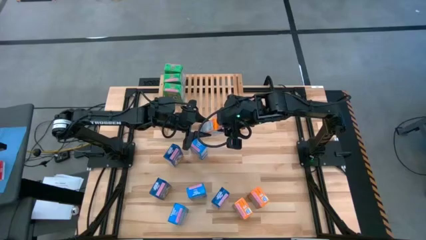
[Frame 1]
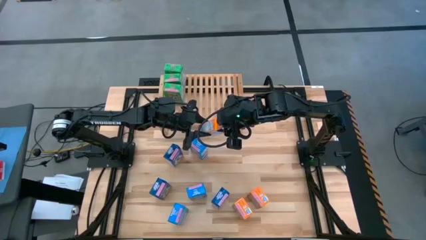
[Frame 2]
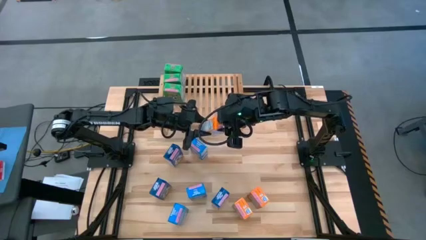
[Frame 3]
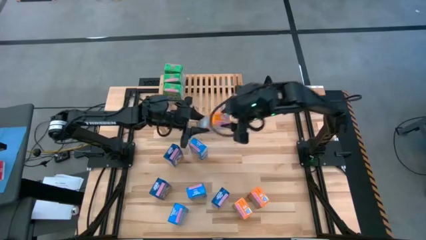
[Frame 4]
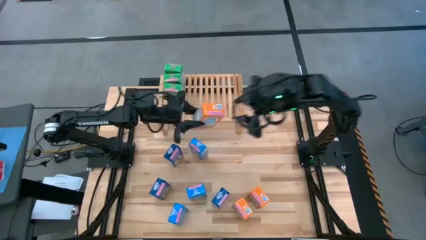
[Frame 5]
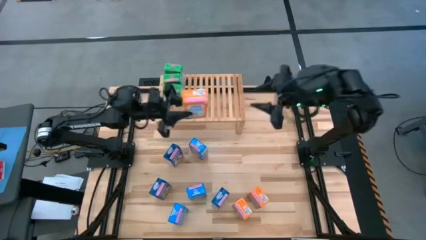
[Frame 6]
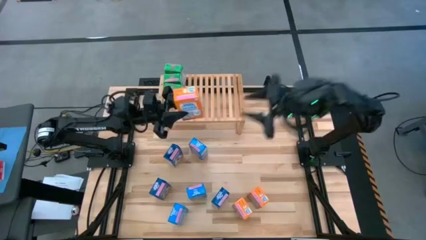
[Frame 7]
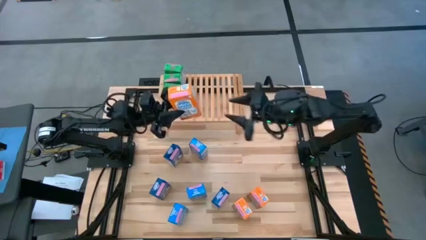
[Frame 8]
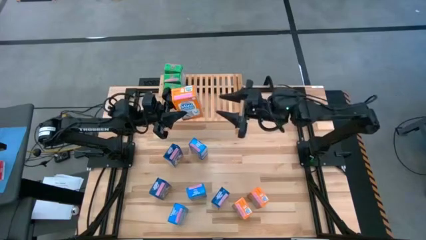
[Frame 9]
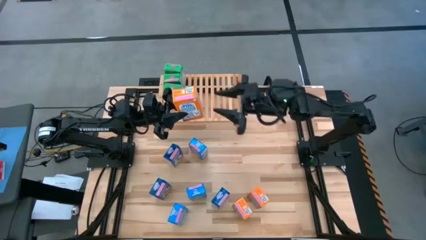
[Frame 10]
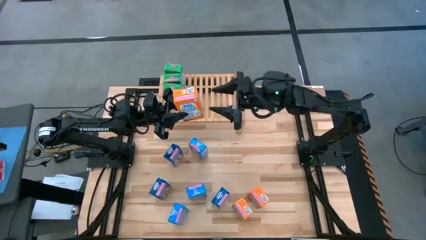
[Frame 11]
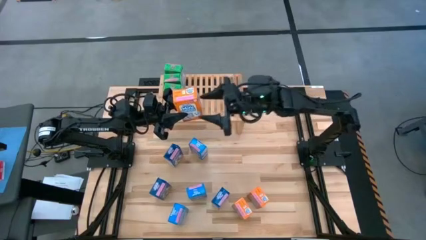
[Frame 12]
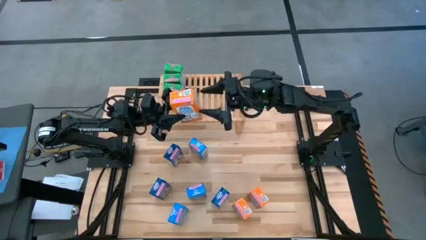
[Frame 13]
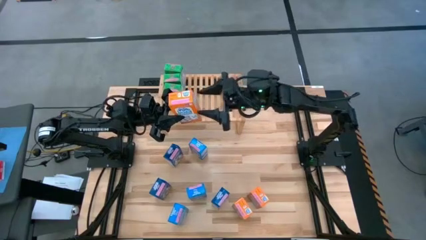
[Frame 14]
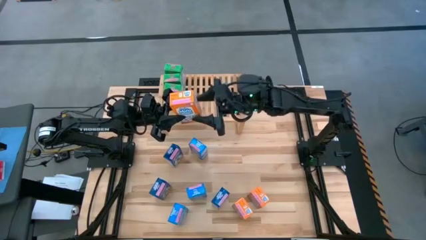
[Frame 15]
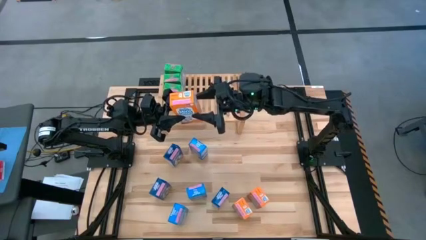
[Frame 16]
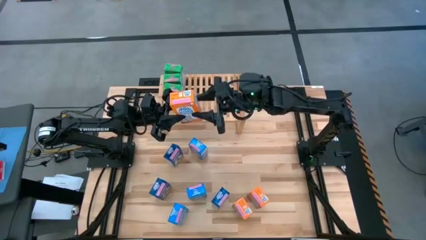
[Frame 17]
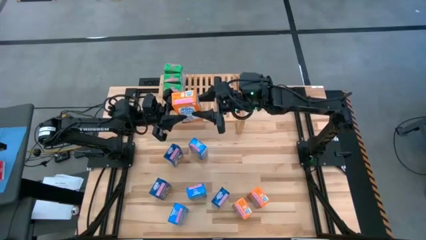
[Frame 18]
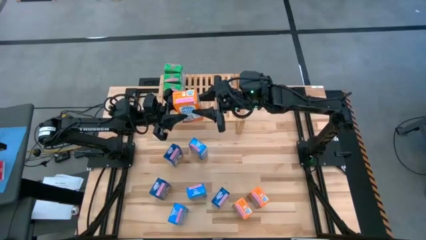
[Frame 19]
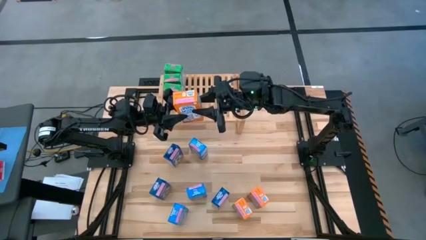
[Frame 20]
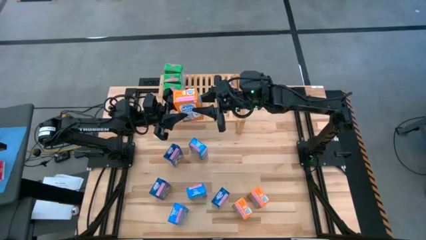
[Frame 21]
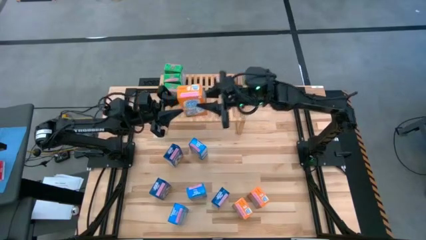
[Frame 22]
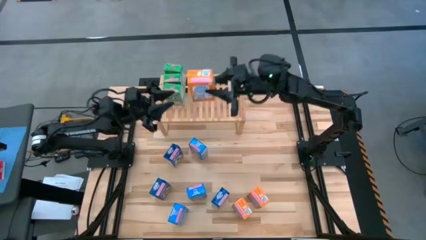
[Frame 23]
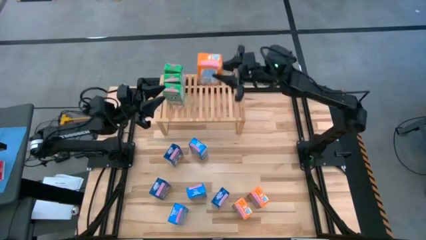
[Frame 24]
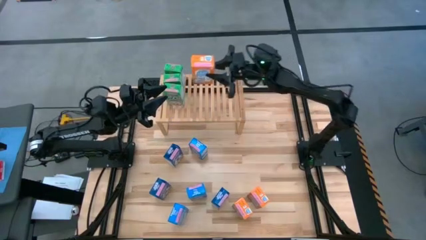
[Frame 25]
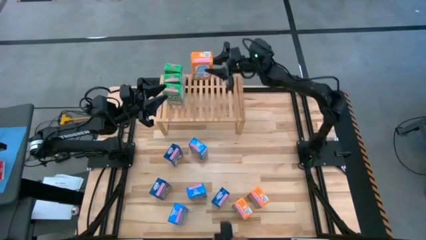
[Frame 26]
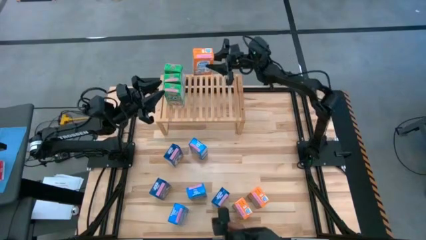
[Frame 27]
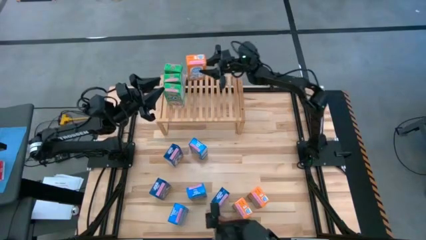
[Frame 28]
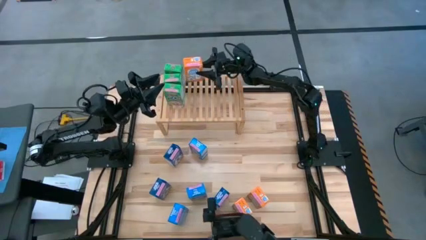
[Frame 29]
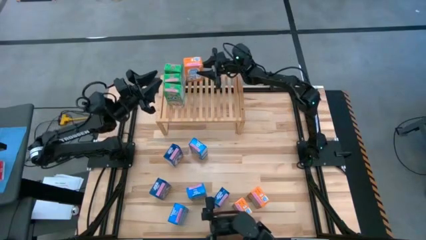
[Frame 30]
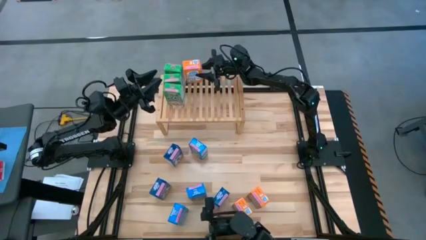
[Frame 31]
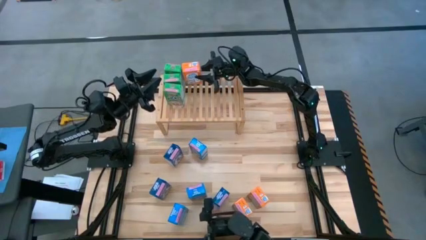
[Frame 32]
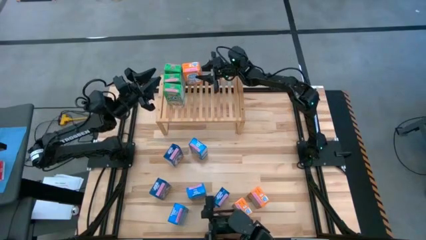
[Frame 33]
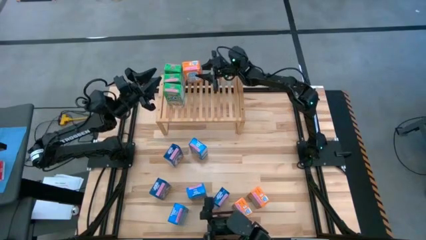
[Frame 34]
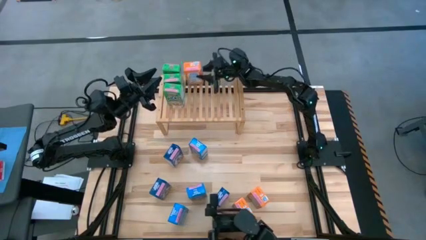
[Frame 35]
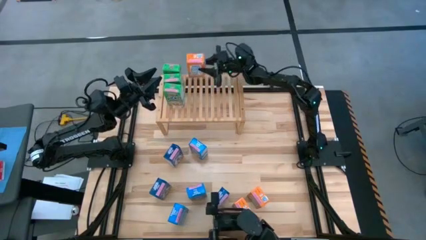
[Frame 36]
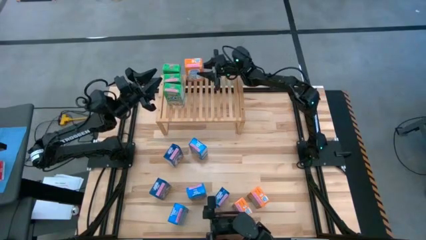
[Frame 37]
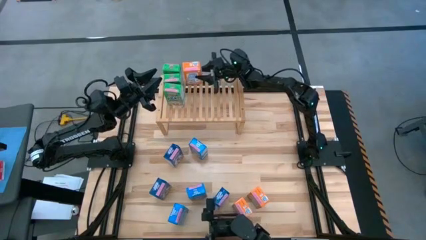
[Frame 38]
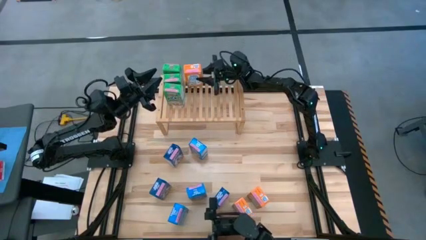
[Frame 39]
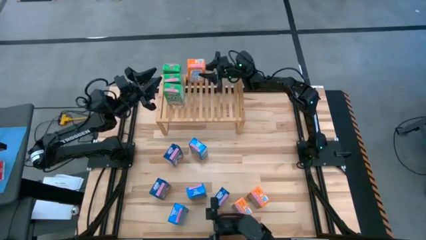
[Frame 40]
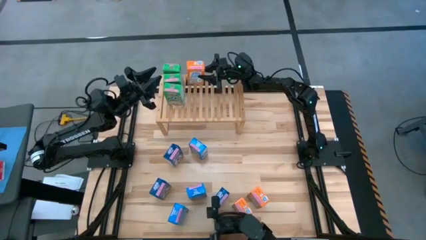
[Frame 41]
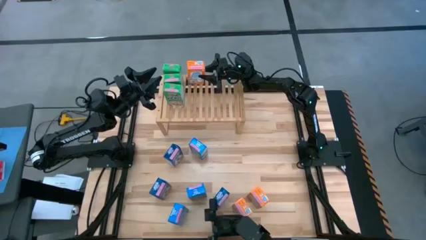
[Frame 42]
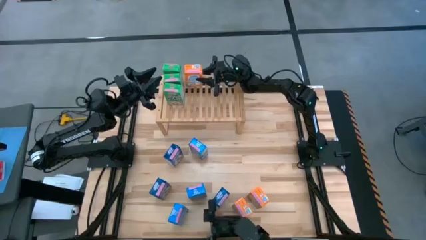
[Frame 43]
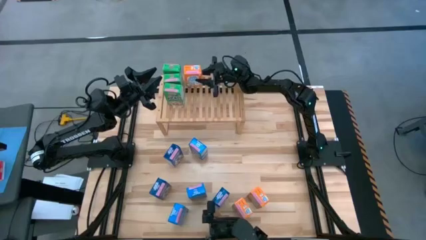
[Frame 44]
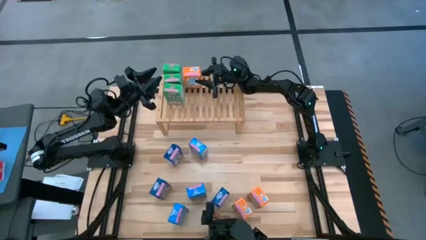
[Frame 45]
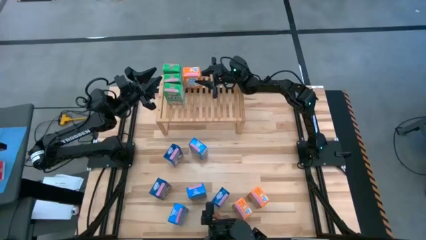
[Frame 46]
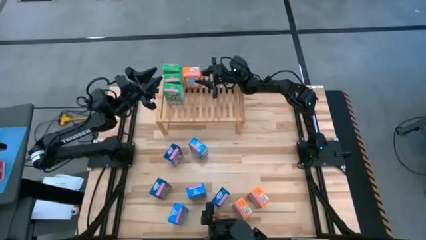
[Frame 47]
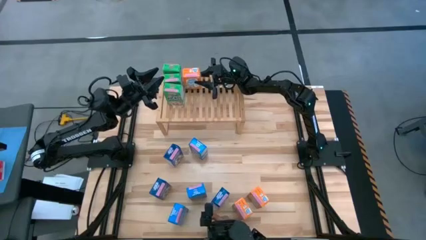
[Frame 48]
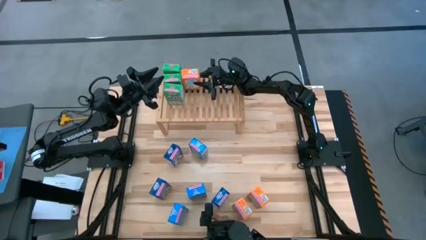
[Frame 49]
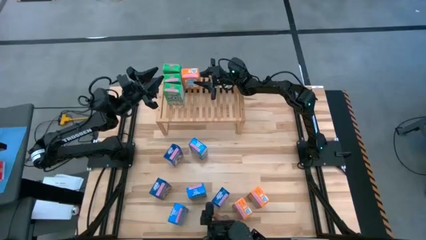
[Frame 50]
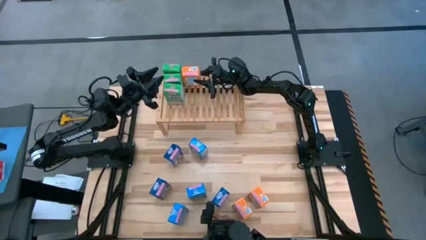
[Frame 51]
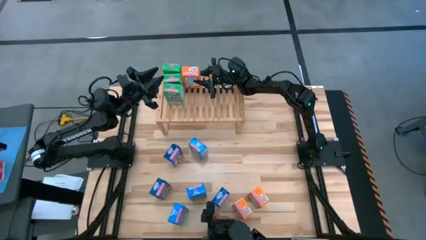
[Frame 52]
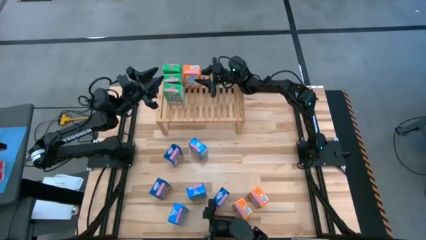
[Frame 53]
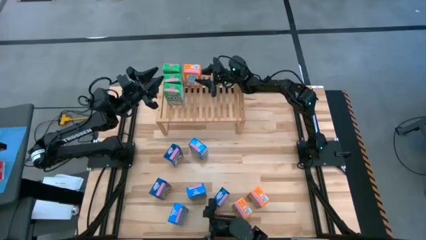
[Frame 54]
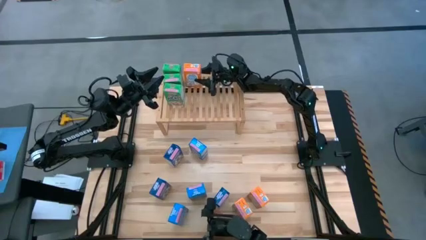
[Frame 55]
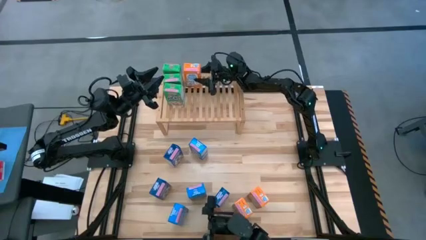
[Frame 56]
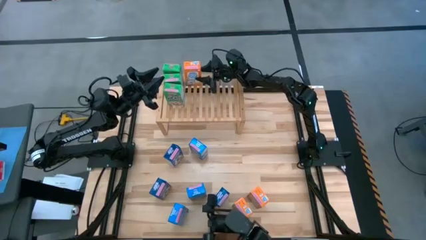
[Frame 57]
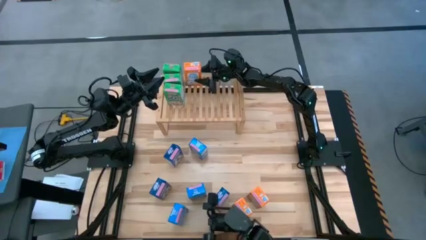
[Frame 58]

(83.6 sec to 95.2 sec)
Task: Stack cereal on shelf
Put the top orange cereal box on the shelf
